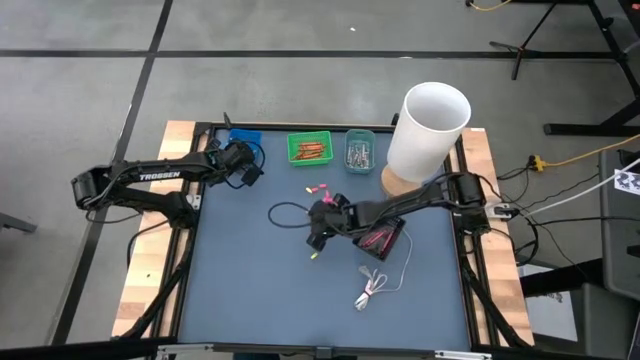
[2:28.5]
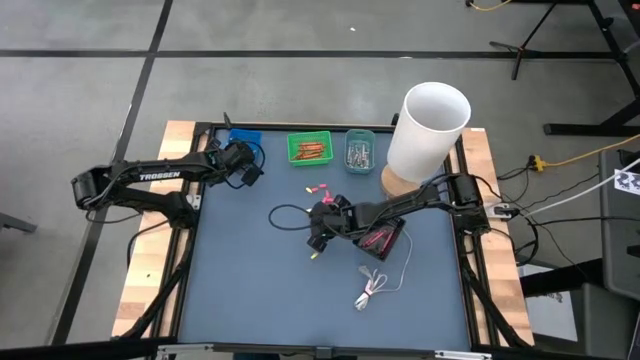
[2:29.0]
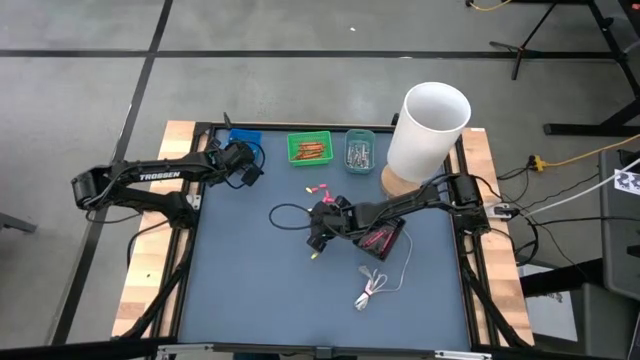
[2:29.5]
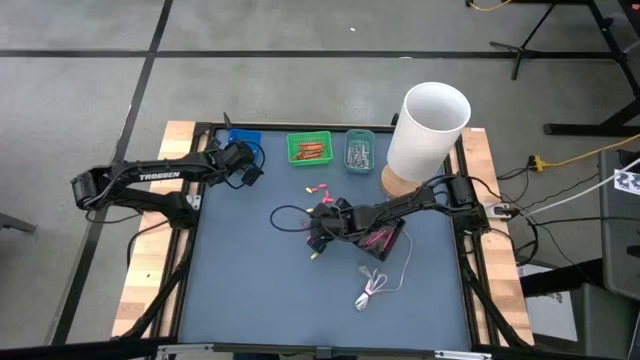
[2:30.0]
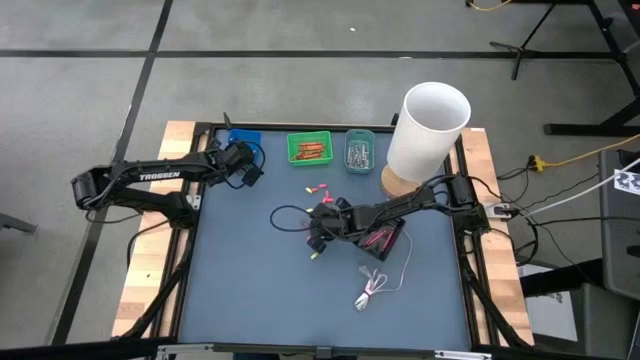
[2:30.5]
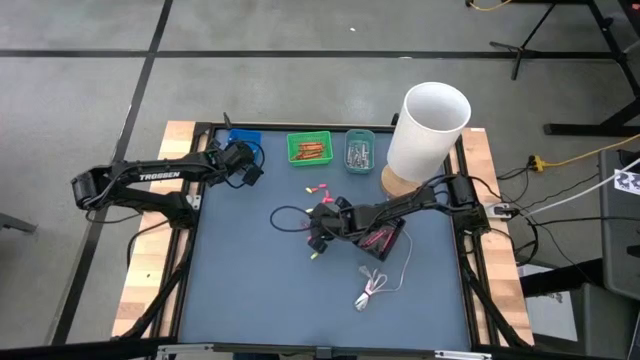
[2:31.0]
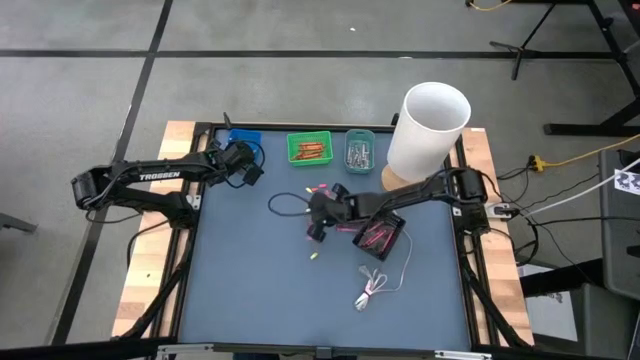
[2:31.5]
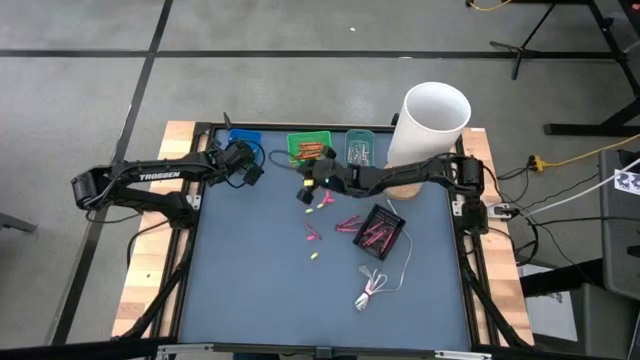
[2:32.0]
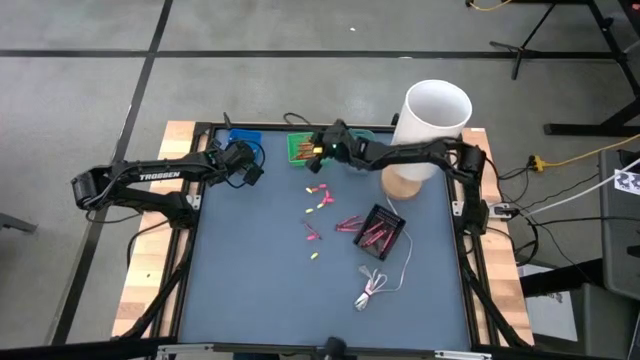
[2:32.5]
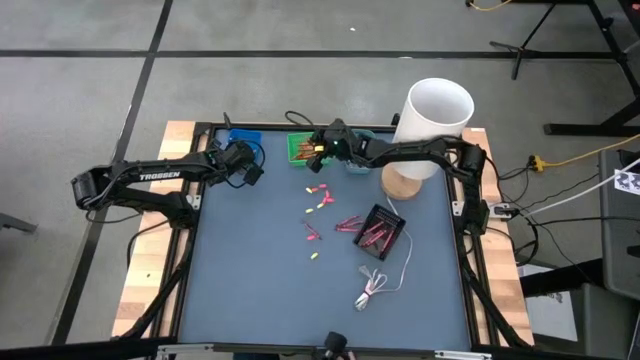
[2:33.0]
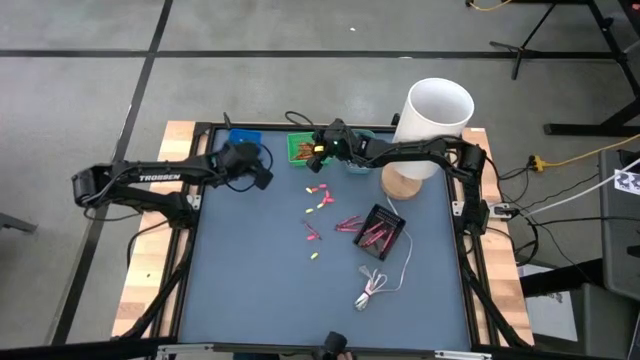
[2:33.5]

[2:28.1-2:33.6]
Task: Sort crayons
Put the orange crayon into the green bin

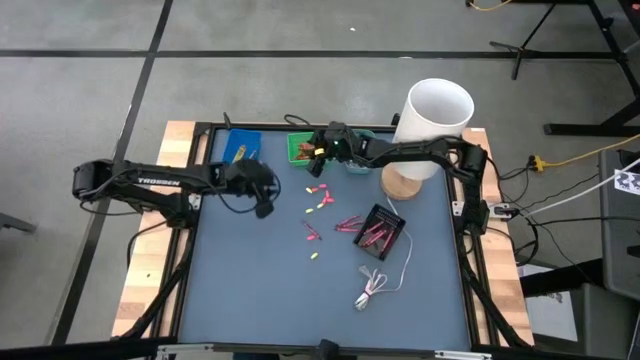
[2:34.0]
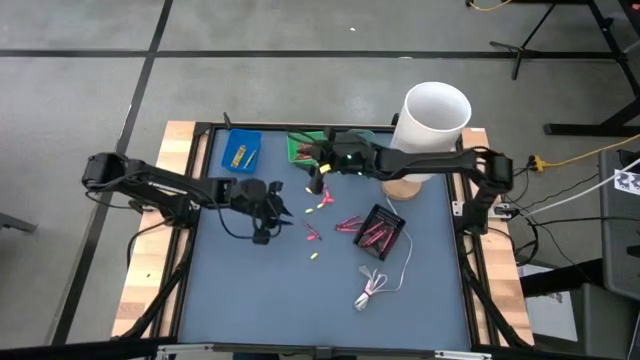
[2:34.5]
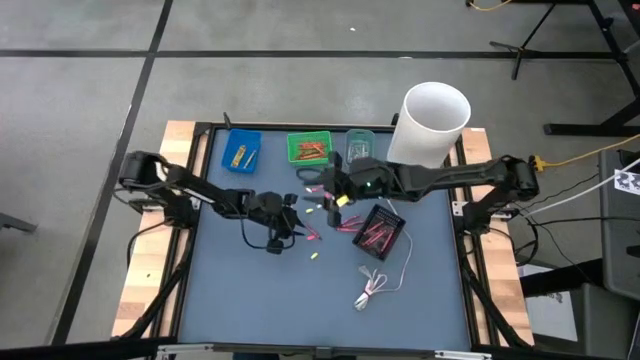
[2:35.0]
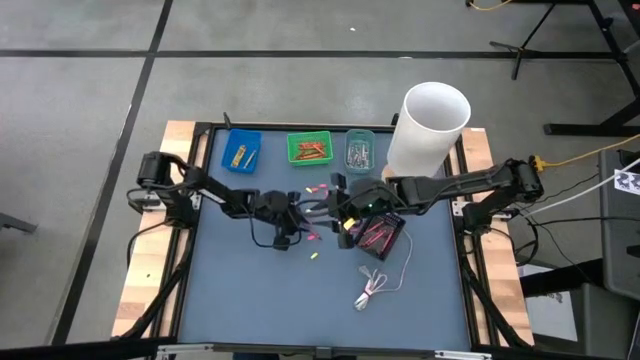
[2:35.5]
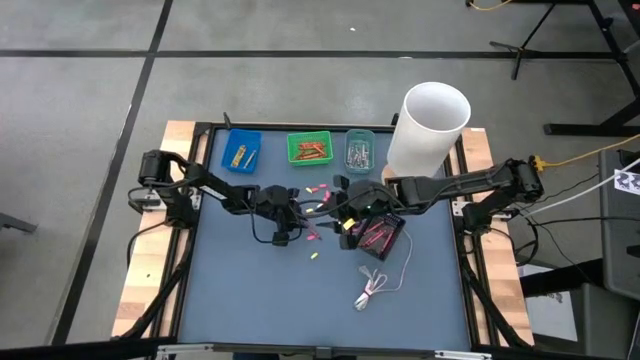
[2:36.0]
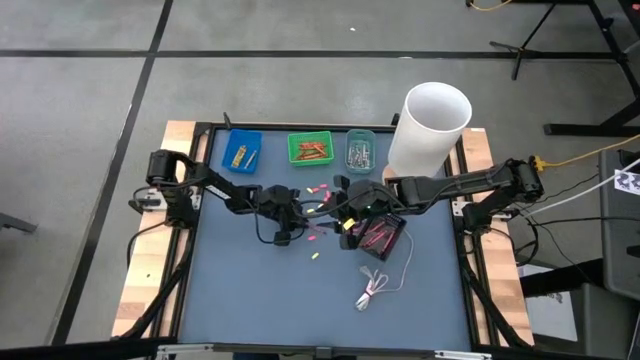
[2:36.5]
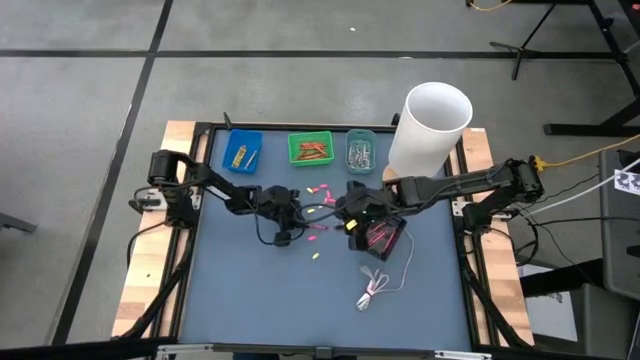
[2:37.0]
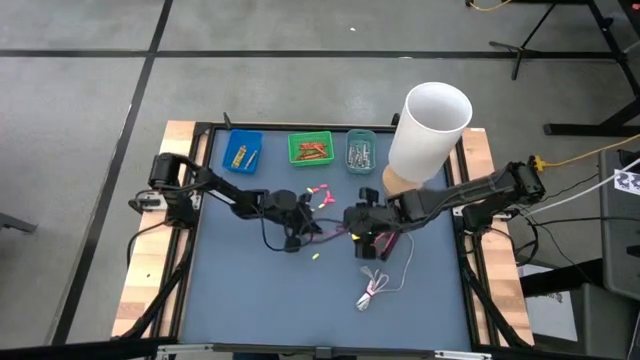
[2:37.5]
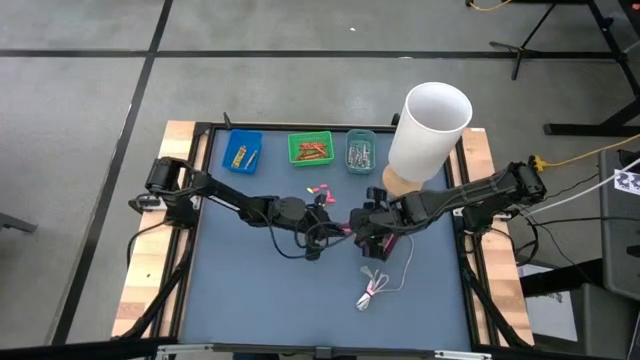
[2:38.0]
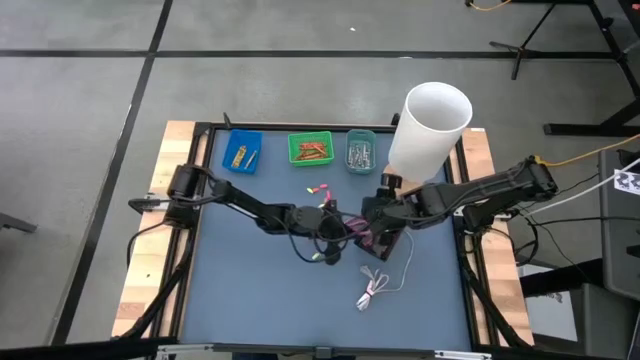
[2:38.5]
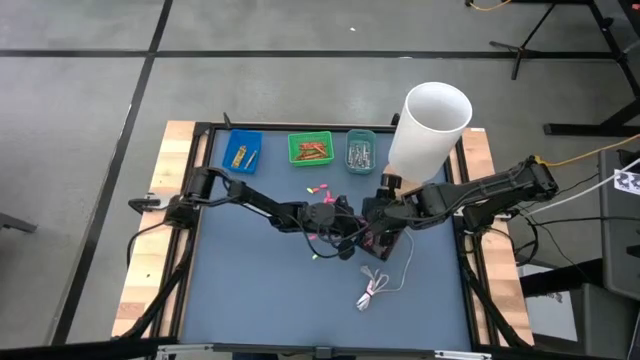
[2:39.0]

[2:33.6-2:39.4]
Put the red crayon into the black bin

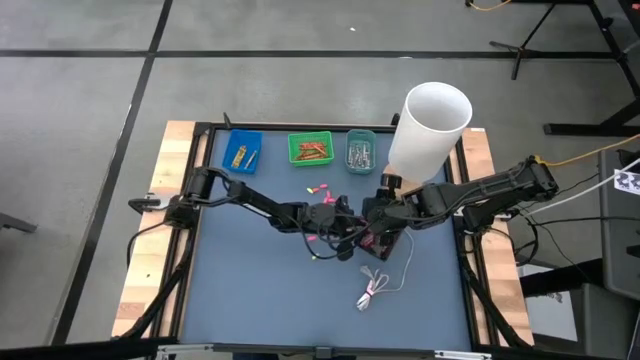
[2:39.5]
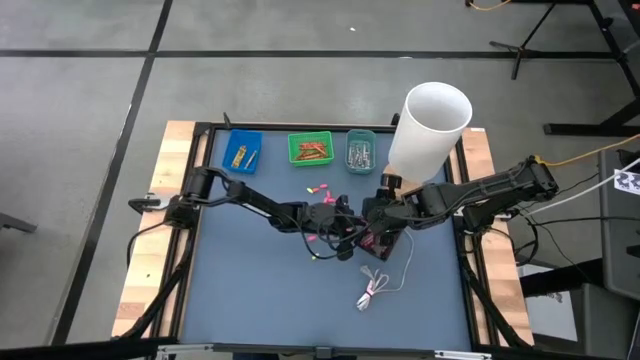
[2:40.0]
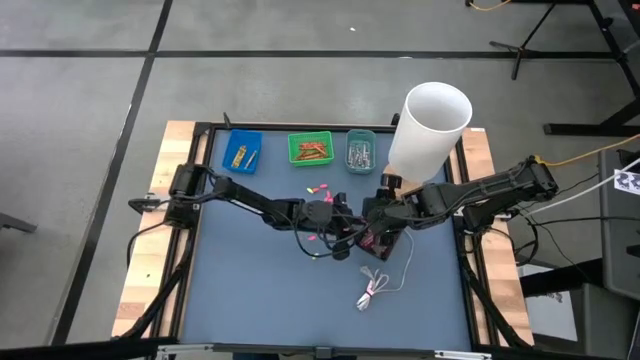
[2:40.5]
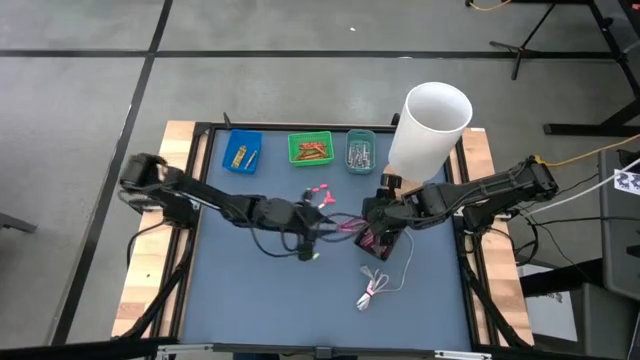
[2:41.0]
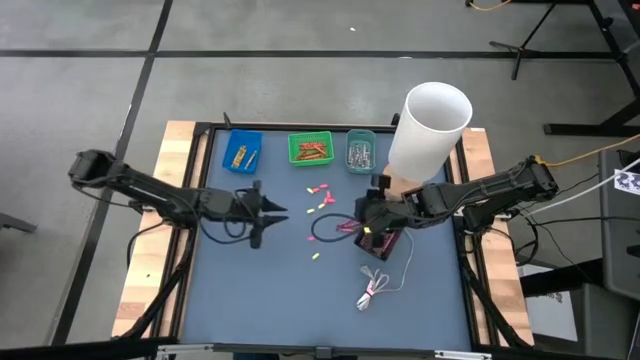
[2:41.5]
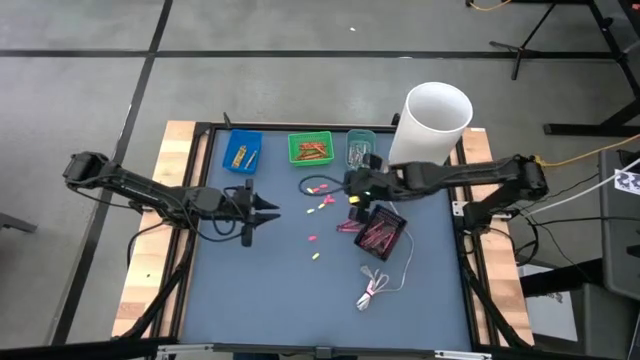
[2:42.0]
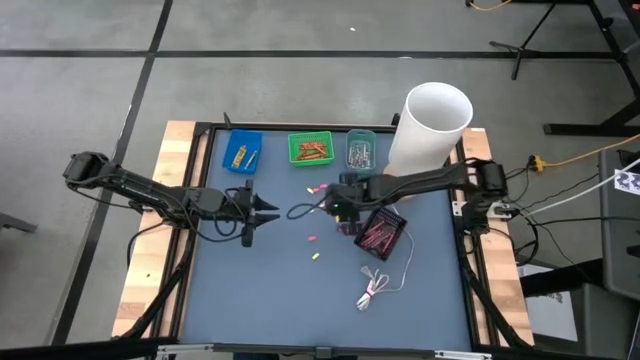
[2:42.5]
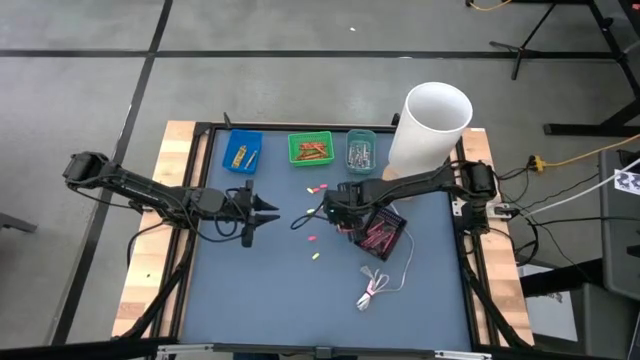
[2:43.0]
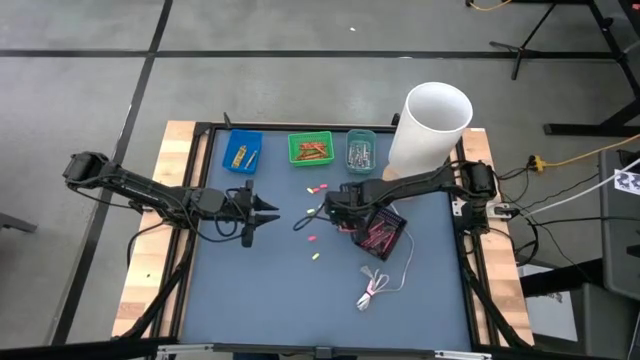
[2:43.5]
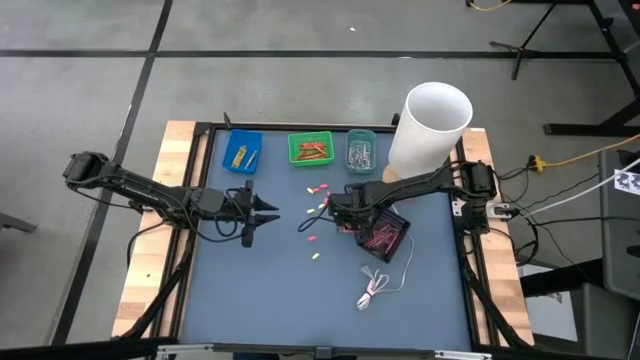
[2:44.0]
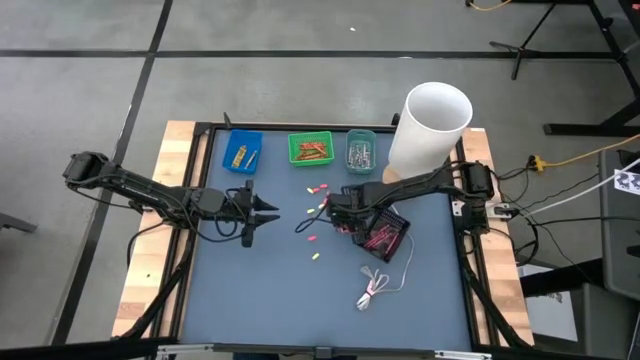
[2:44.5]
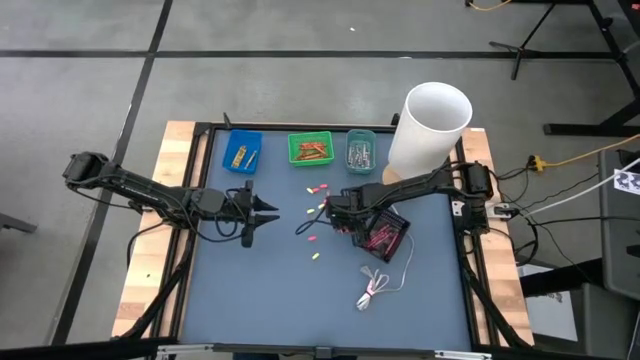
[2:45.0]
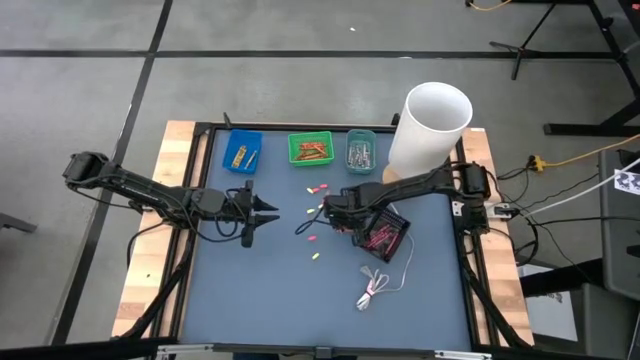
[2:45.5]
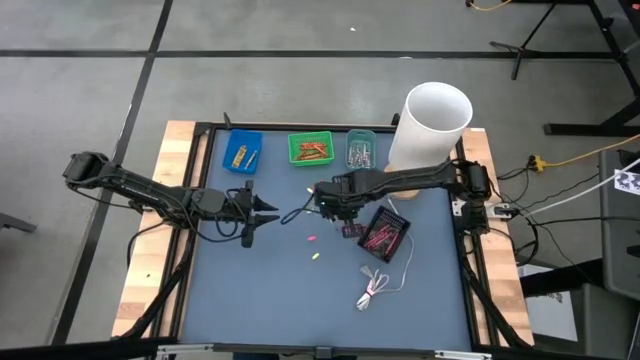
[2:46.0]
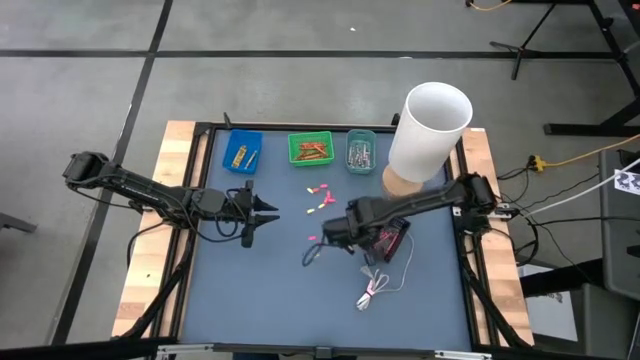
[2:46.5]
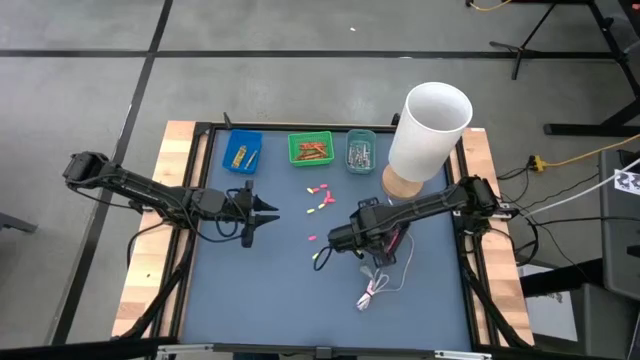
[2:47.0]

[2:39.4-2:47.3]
Put the red crayon into the black bin

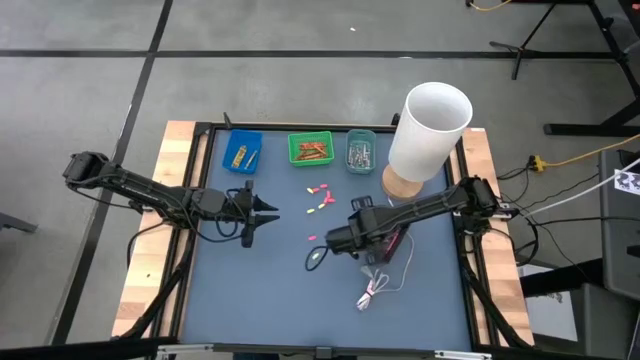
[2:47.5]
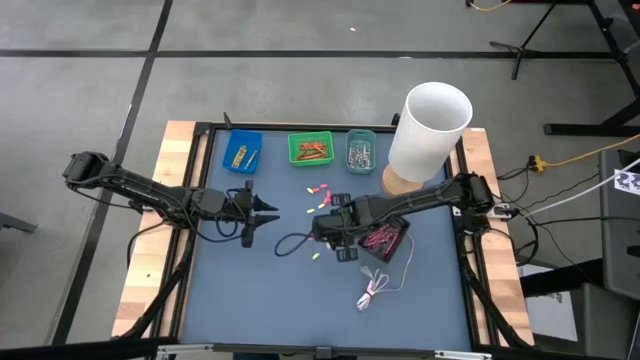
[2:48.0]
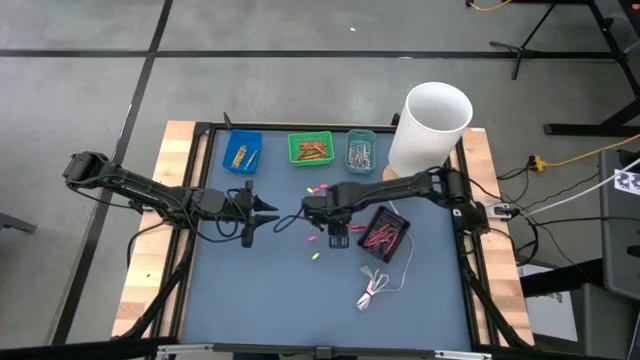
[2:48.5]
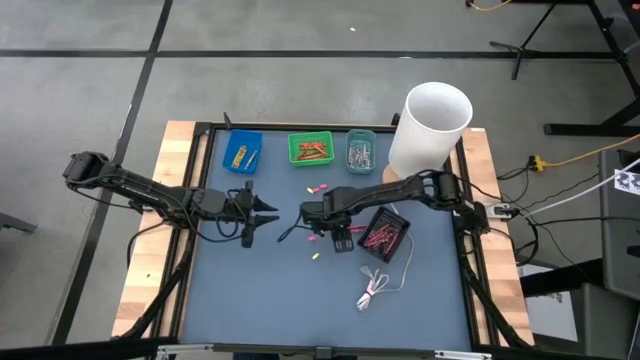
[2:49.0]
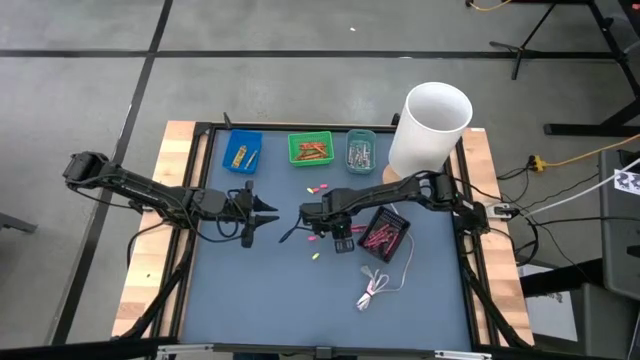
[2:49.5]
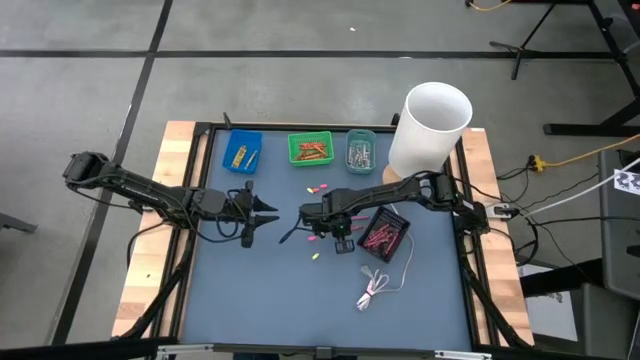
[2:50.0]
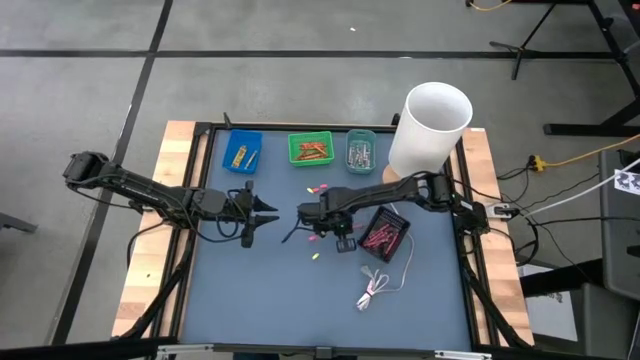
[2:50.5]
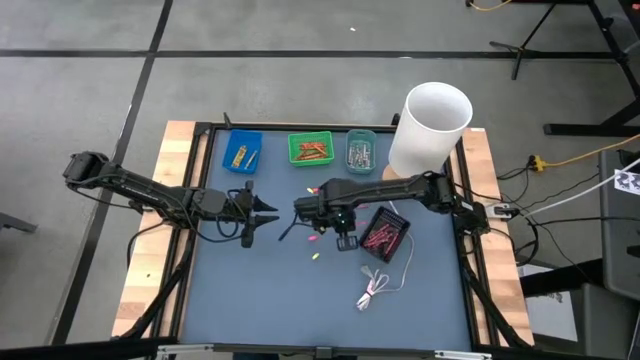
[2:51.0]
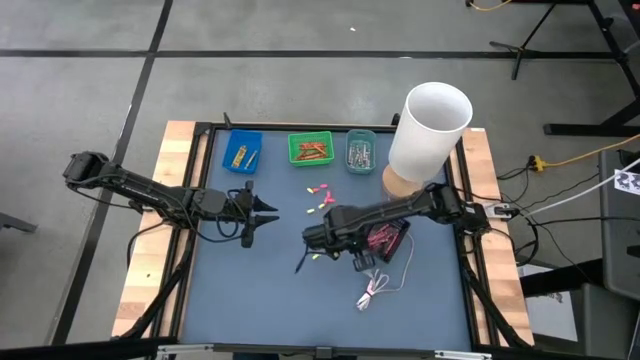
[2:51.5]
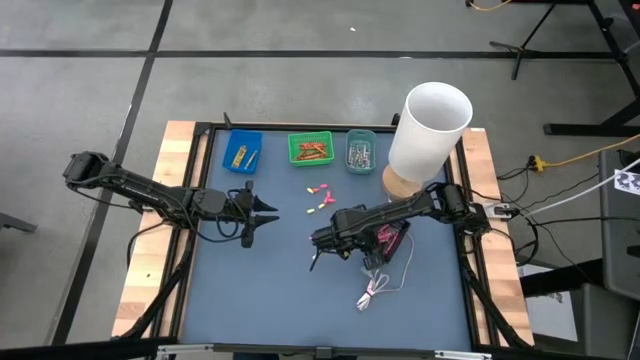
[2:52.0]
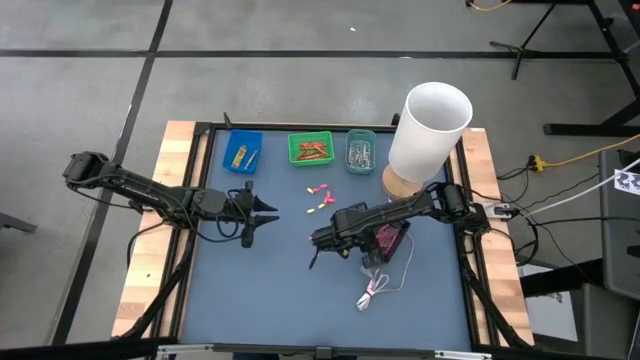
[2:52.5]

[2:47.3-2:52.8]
Put the red crayon into the black bin
